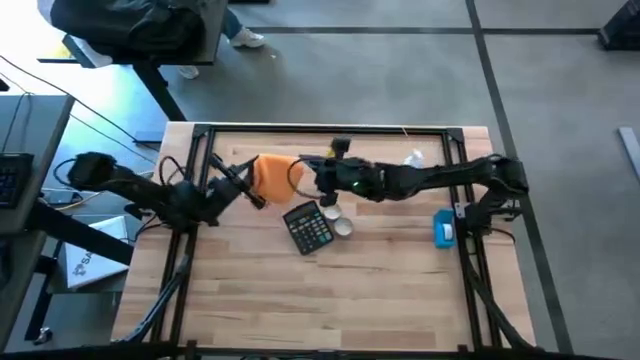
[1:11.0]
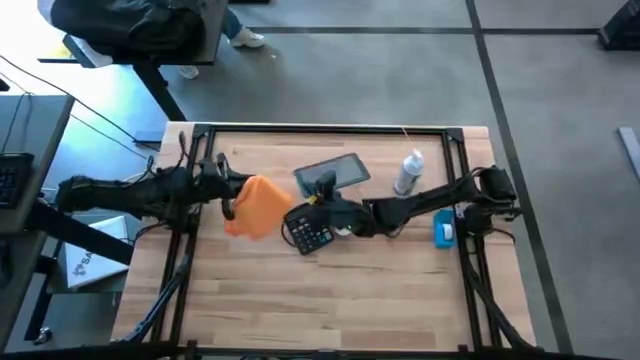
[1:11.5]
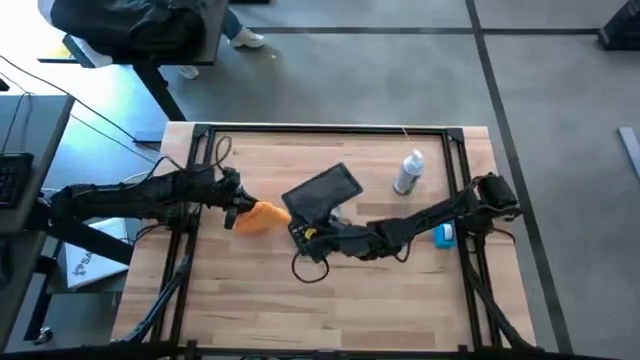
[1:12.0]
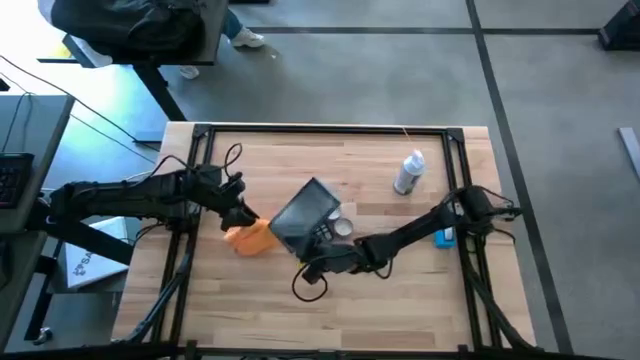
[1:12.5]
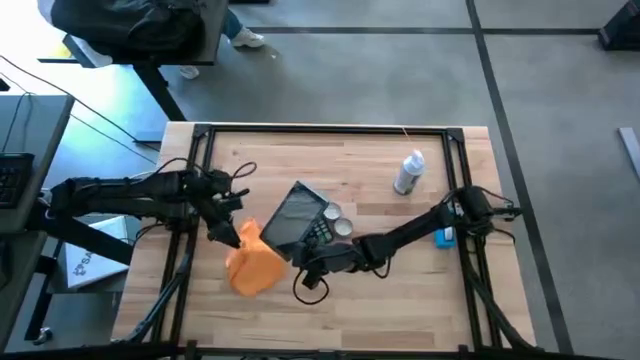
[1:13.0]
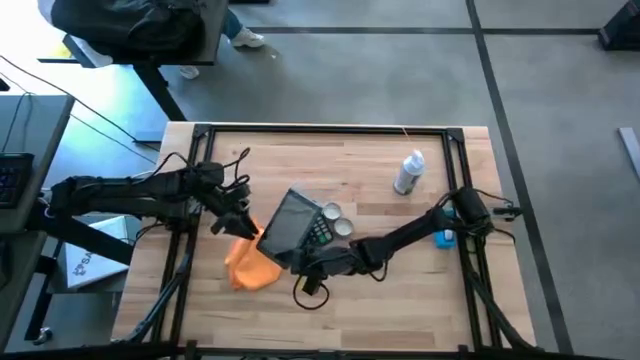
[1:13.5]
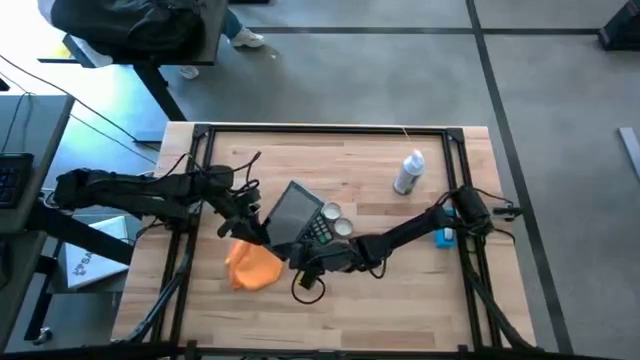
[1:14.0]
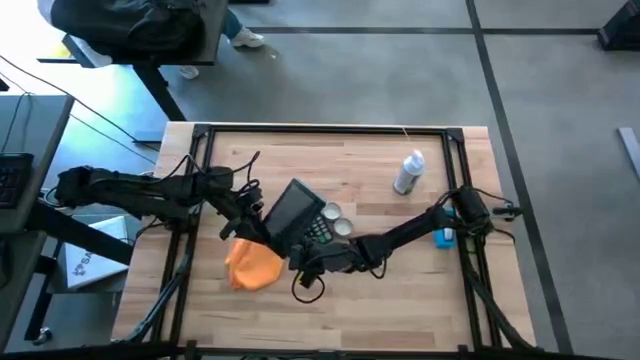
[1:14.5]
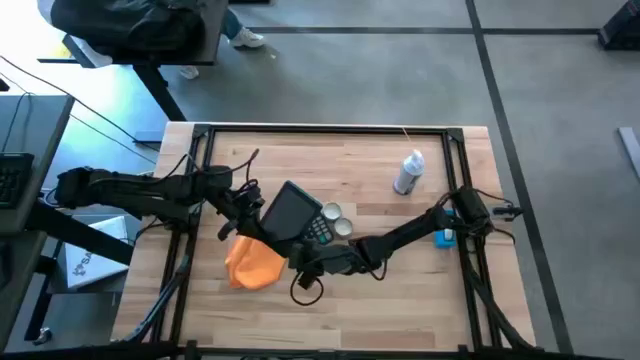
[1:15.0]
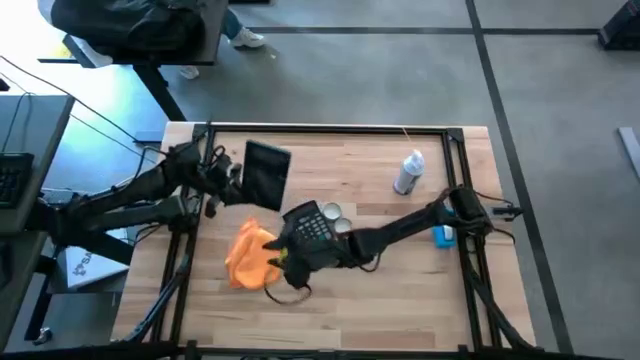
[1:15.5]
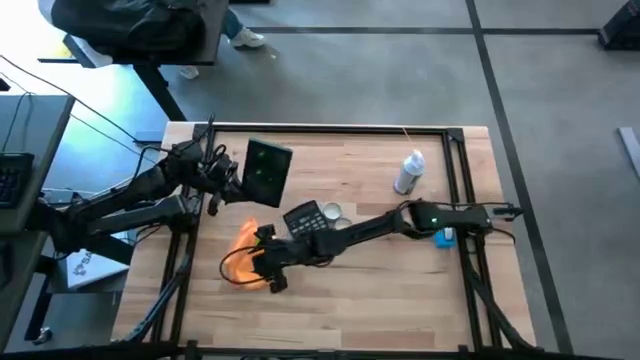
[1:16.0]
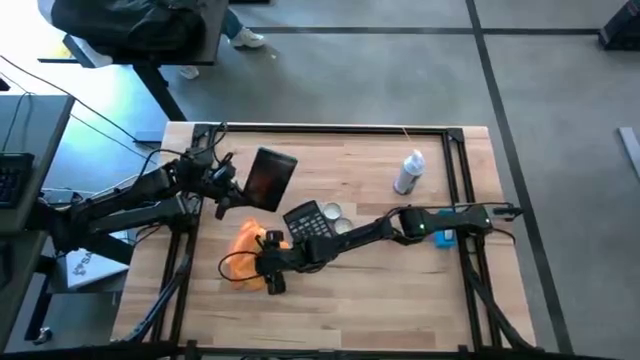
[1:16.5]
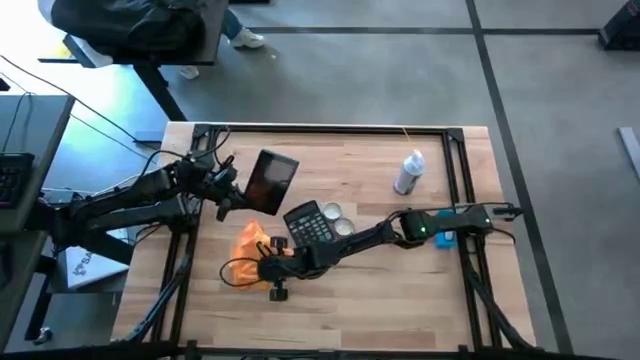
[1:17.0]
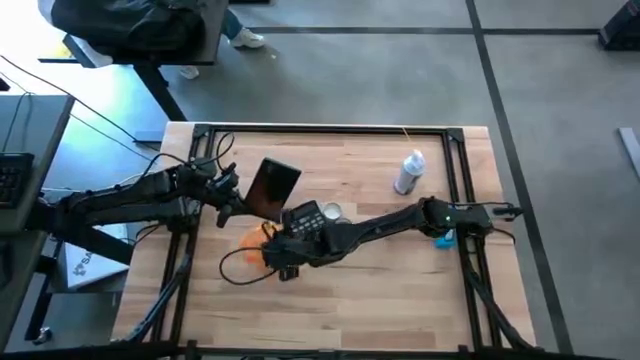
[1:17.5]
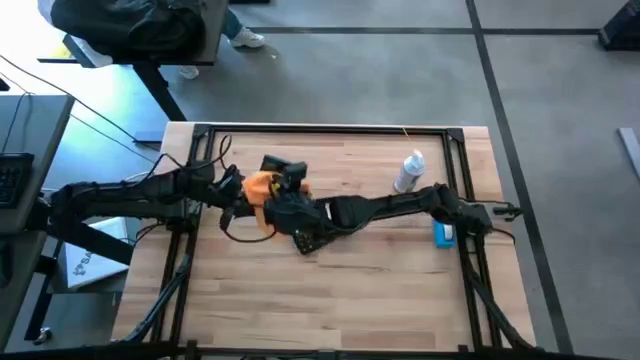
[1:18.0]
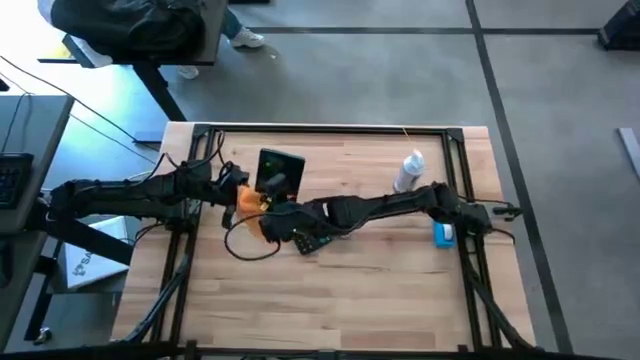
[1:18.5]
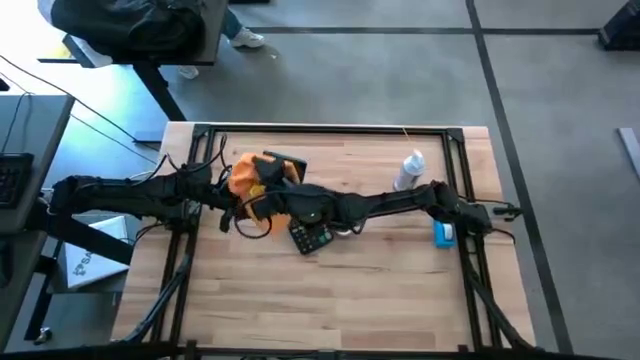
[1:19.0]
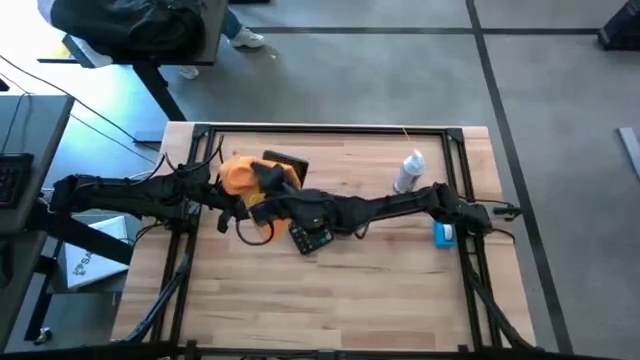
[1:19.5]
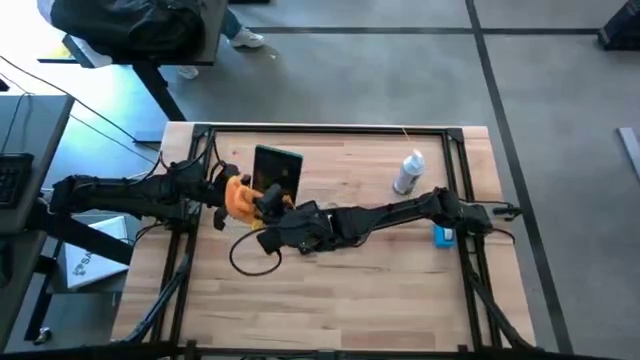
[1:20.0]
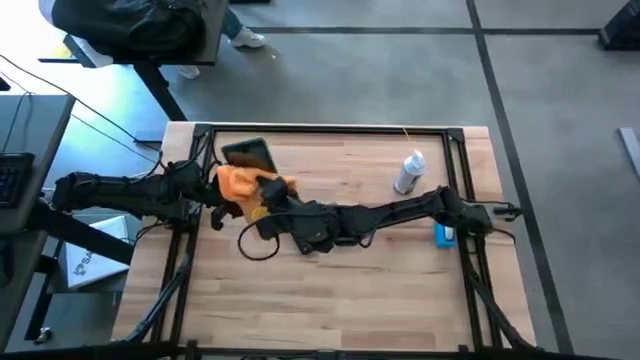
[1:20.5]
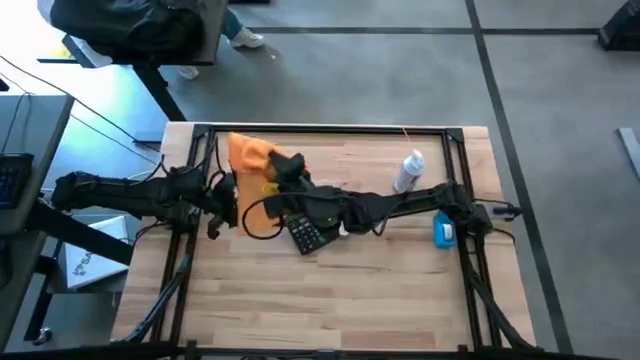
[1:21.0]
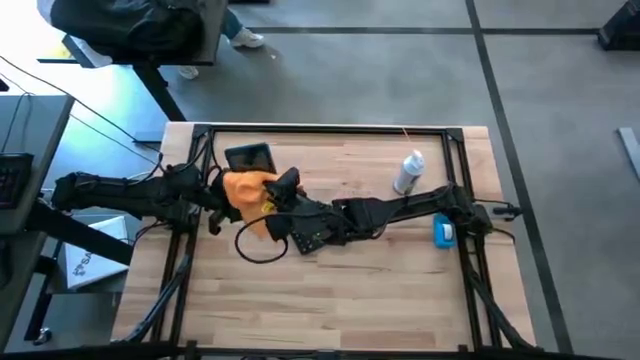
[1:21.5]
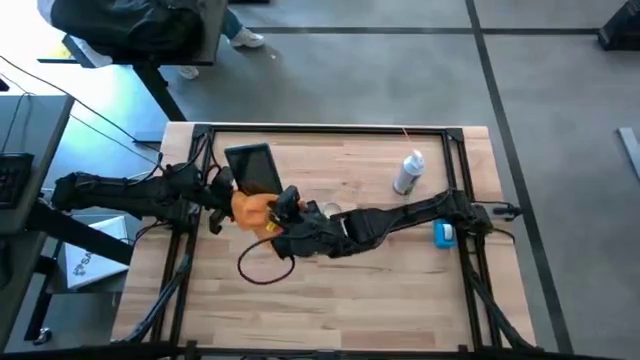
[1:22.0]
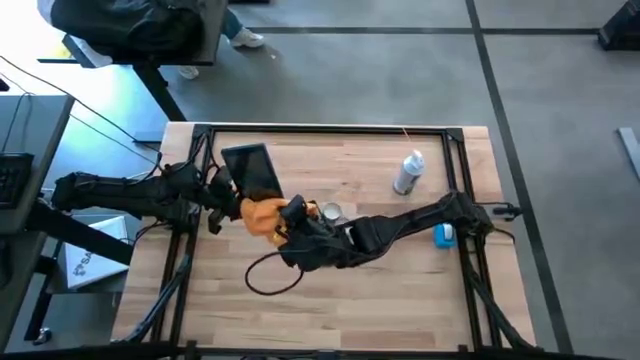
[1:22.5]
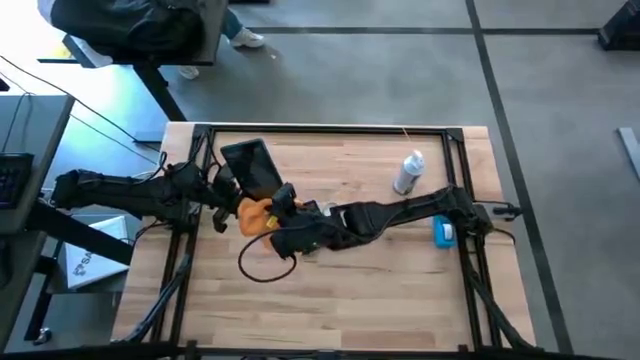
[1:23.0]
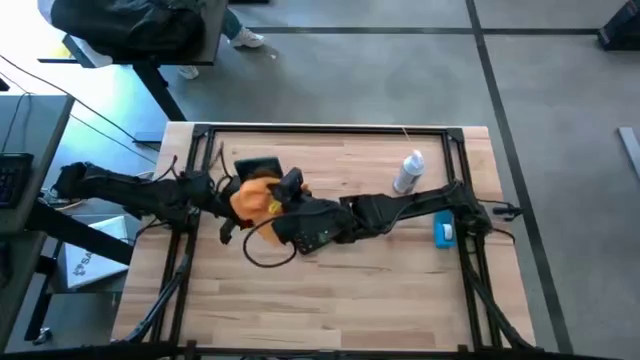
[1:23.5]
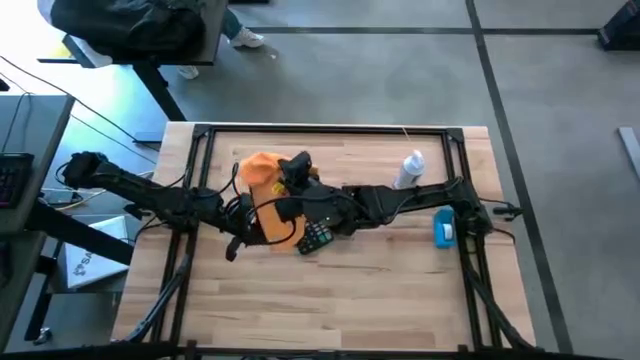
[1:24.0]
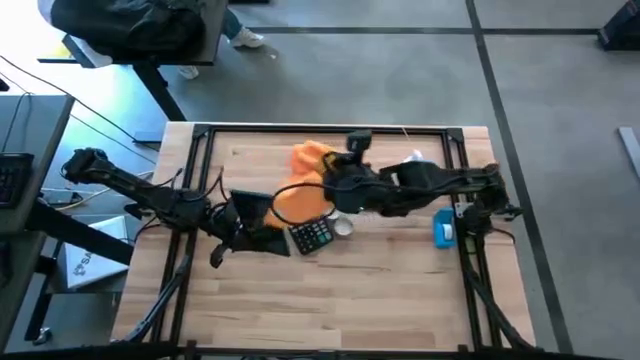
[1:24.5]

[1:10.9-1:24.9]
Task: Apply microfiber cloth
Wipe the front of the black tablet with the yellow microfiber cloth

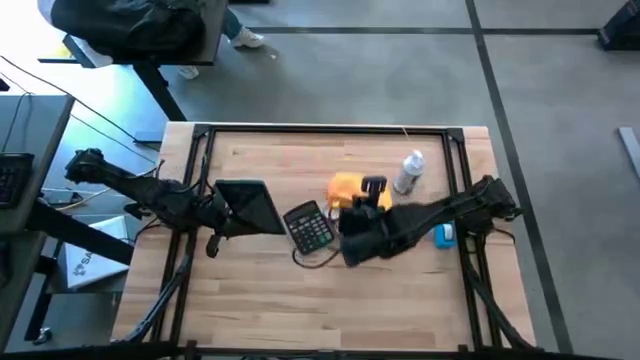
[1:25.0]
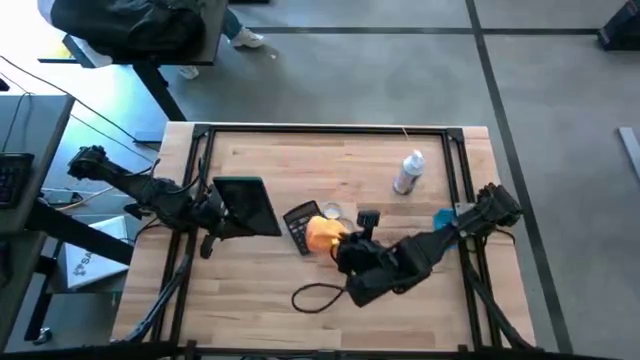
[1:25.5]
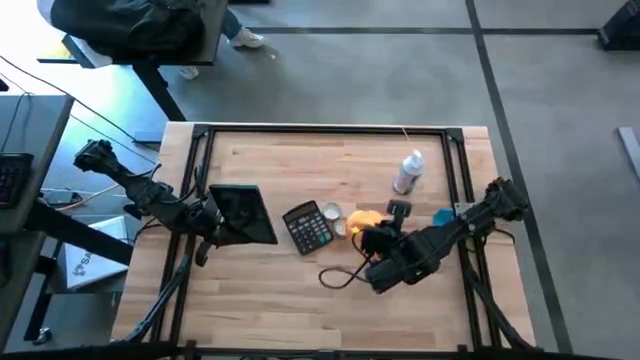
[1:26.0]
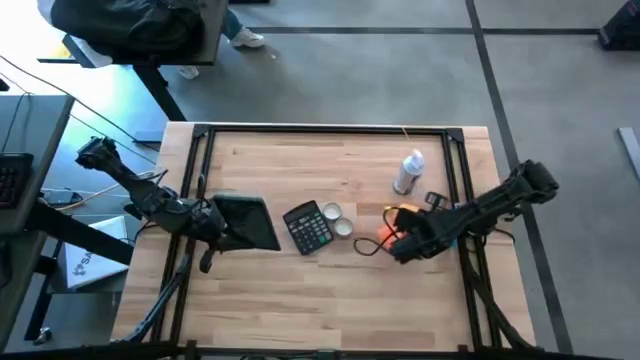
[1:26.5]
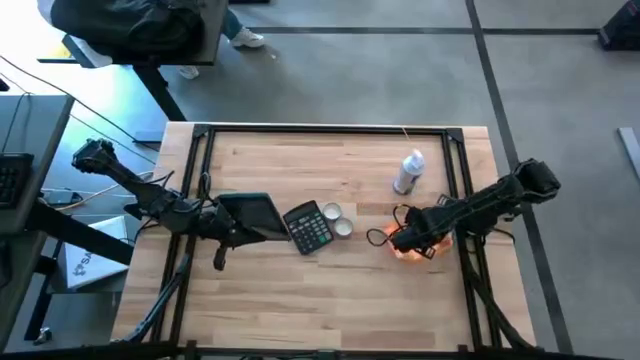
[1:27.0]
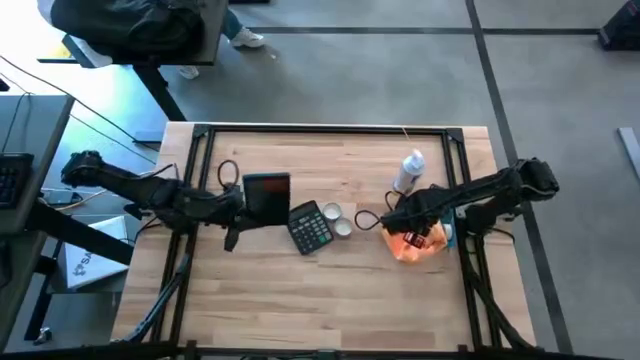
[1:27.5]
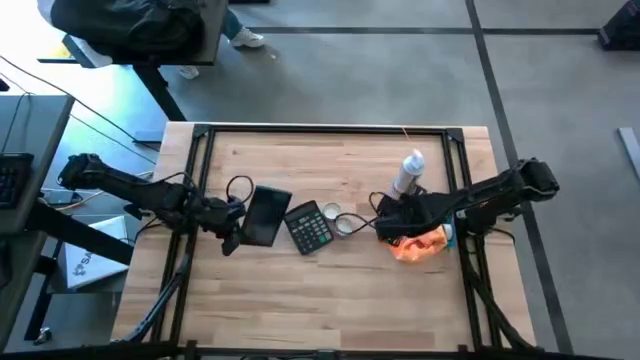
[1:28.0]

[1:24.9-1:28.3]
Put the yellow microfiber cloth on the table

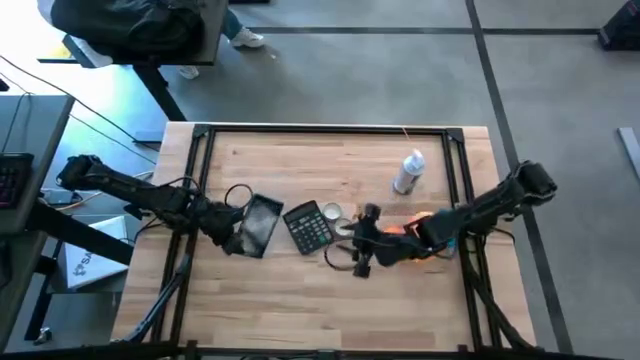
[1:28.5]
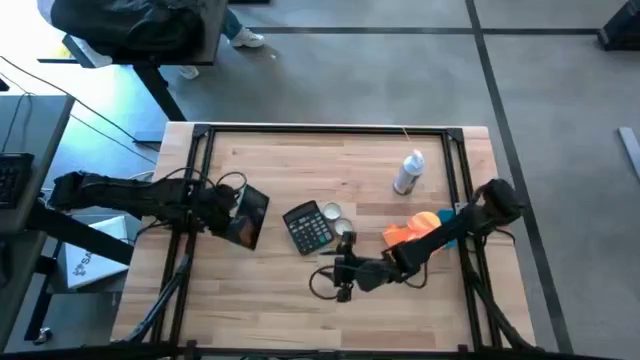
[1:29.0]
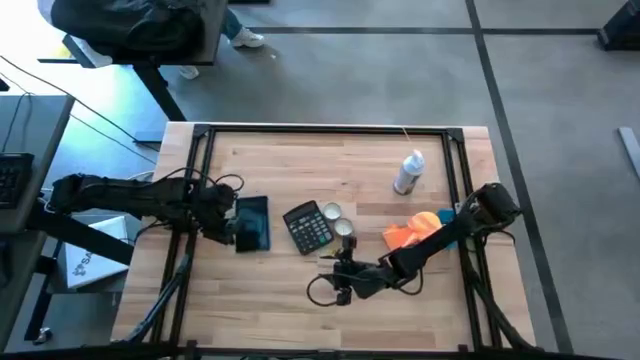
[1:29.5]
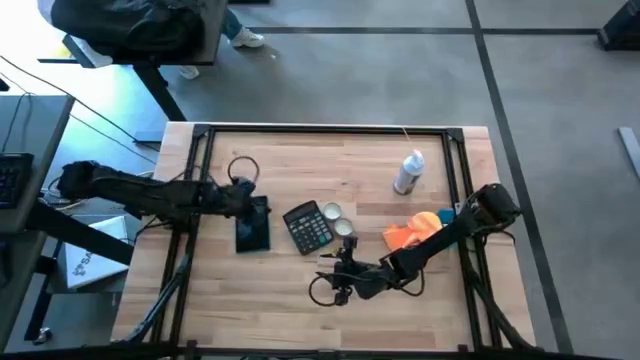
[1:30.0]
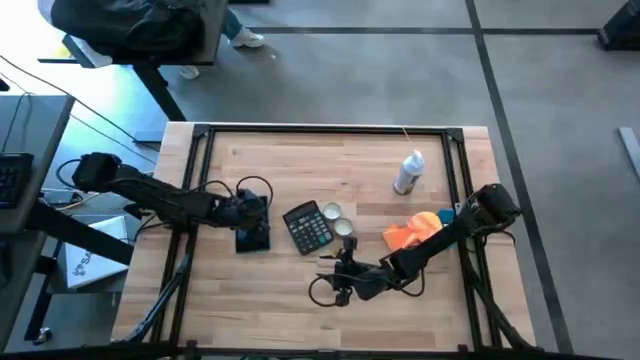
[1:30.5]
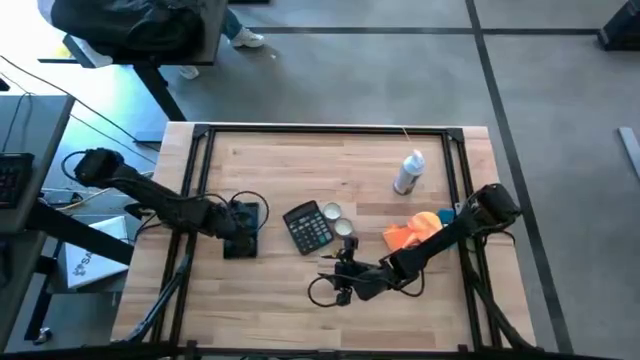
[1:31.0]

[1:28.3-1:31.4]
Put the black tablet on the table

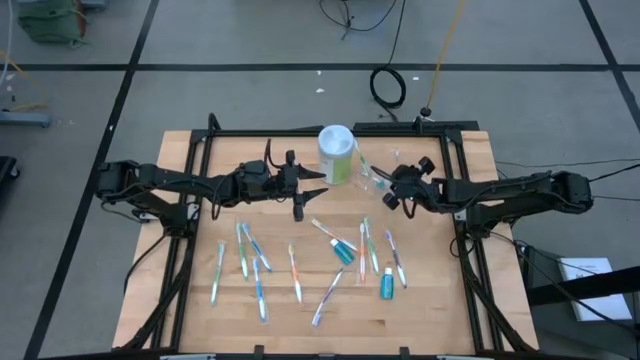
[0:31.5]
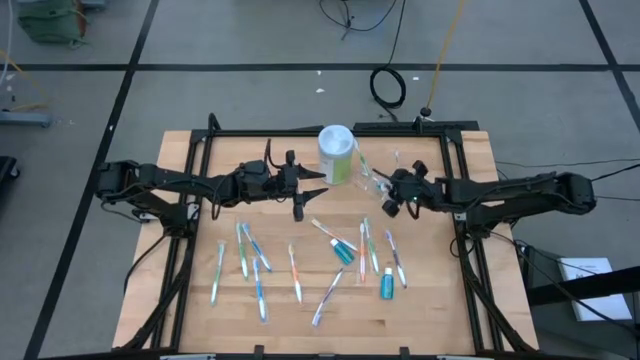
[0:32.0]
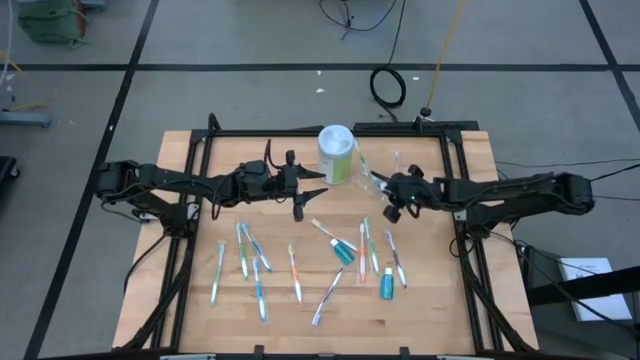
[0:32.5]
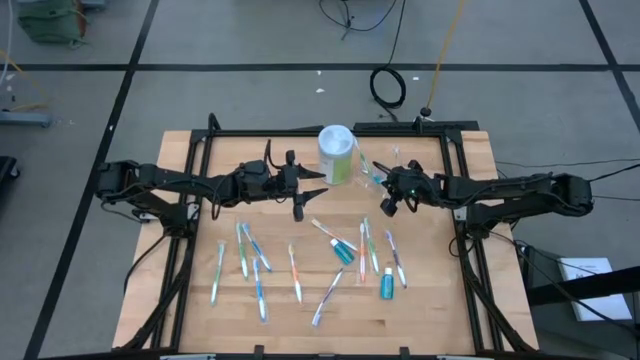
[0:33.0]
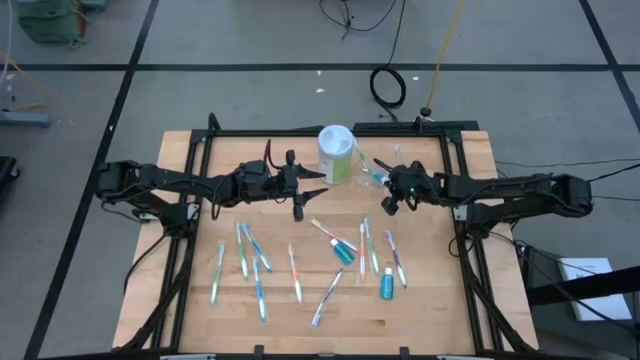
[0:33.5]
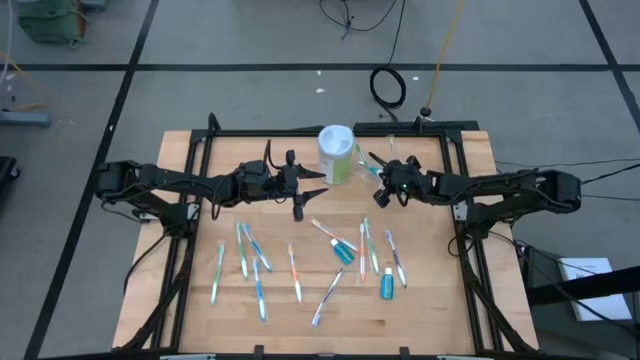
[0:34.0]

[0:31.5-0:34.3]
Task: Pick & Place toothbrushing station
Adjust the transparent organizer
